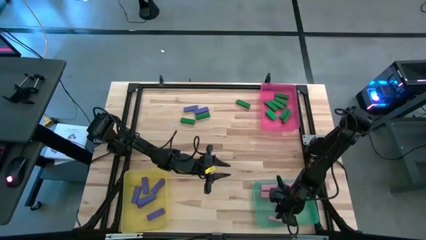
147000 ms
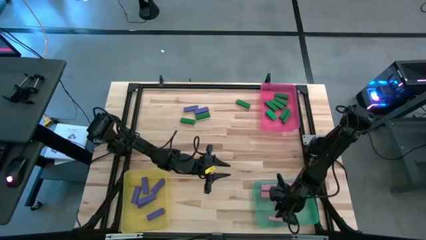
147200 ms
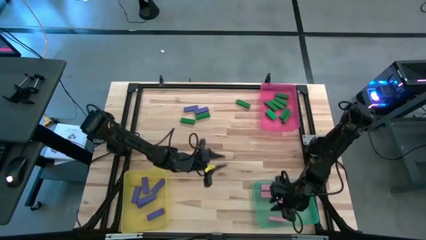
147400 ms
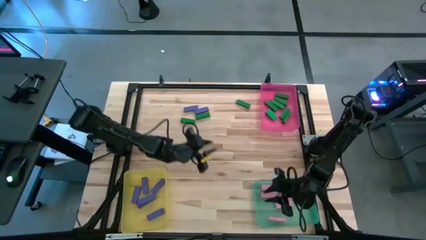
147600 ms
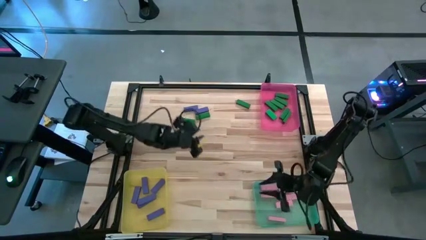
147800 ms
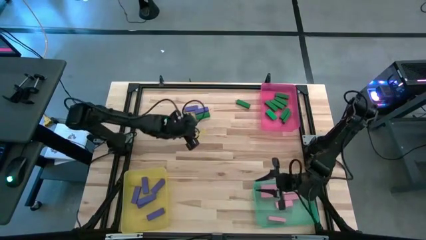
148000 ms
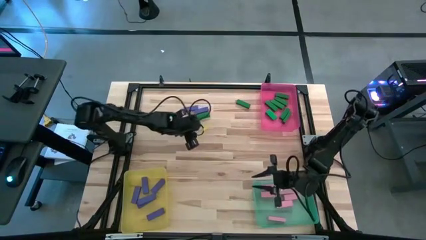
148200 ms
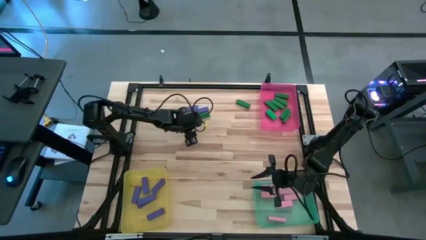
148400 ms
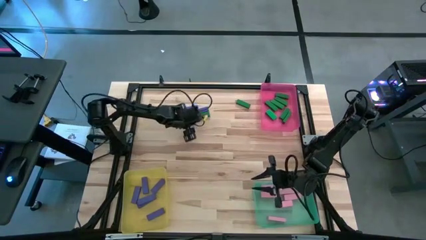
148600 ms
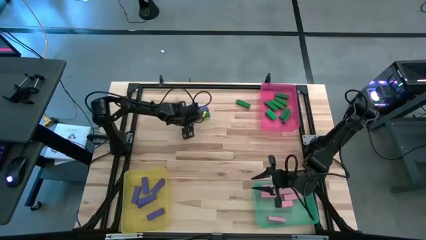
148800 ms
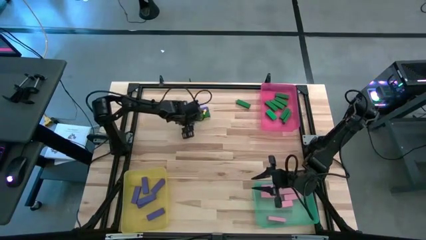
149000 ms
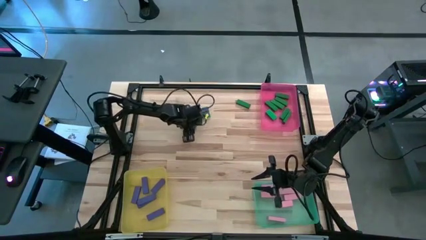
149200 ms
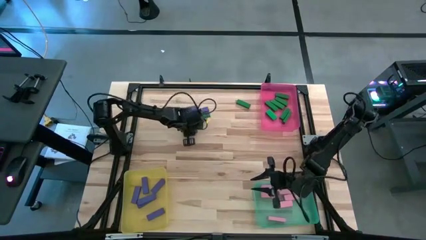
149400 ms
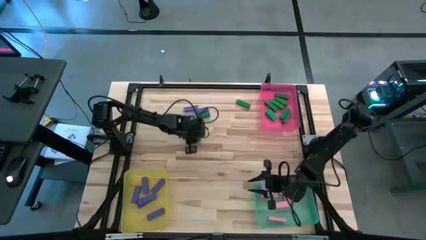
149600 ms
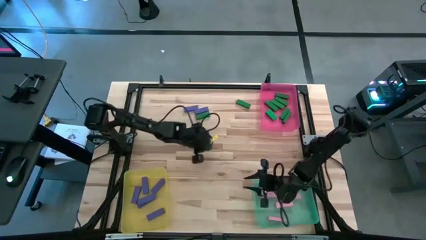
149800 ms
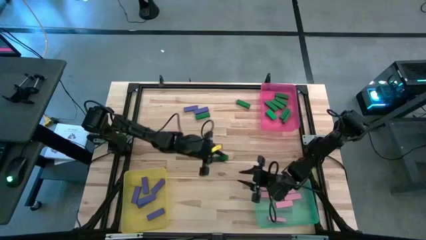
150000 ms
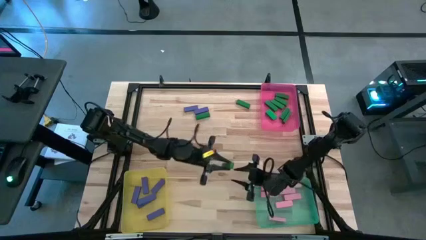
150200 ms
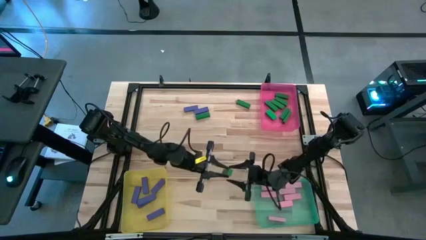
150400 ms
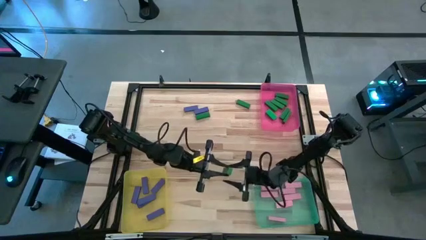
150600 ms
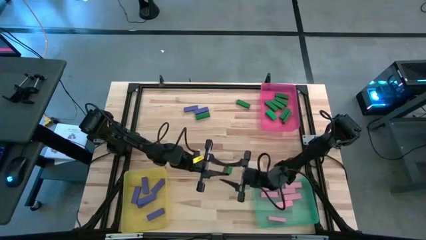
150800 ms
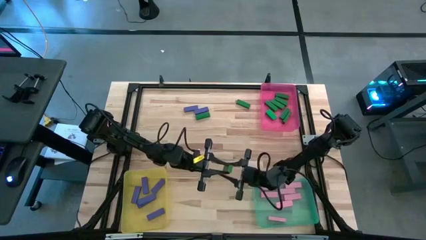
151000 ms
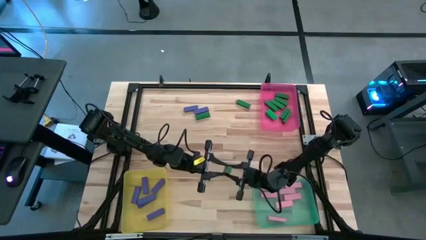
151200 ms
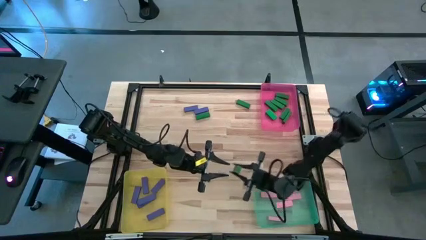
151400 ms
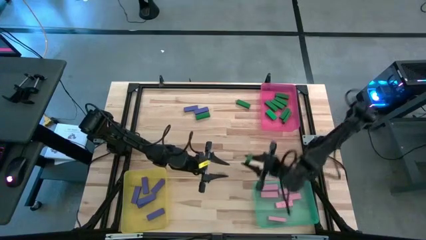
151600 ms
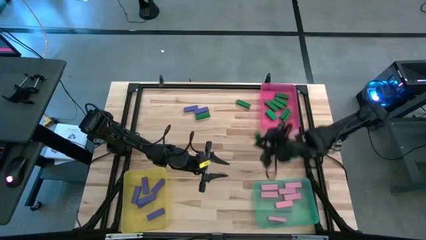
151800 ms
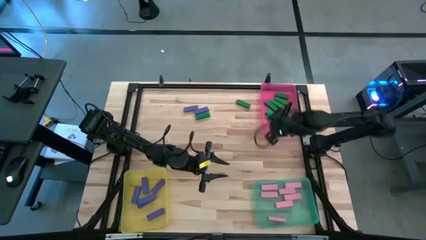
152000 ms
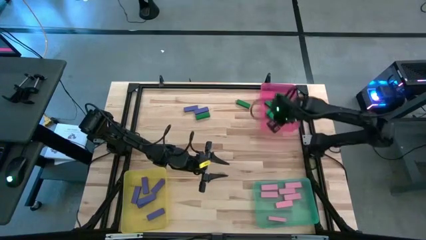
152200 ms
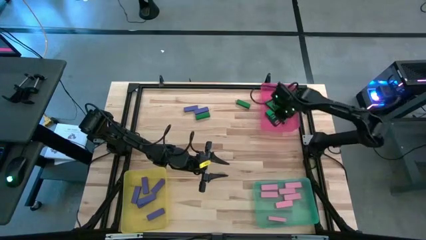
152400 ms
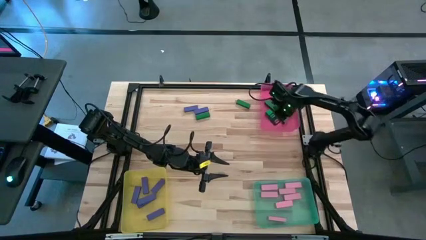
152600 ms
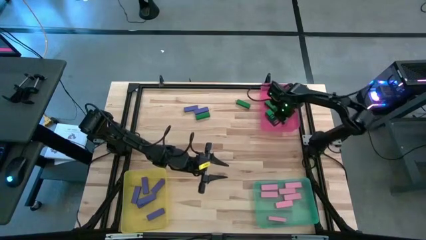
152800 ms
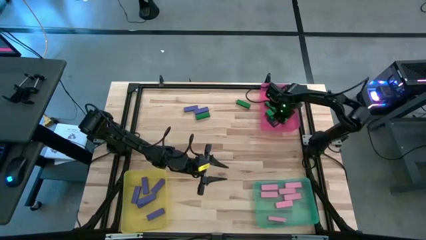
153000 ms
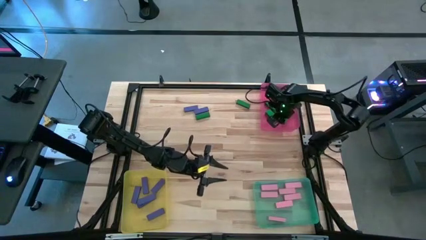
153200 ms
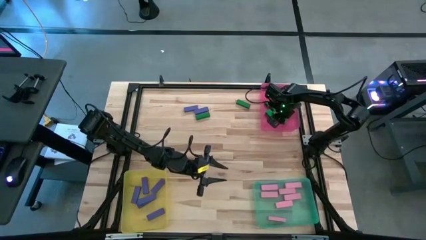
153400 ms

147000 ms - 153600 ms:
Task: Sort blocks
Put the green block into the pink bin

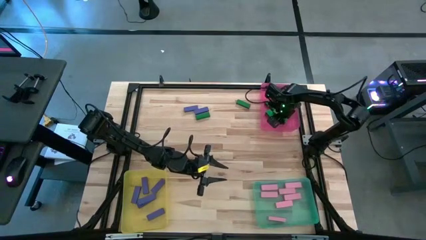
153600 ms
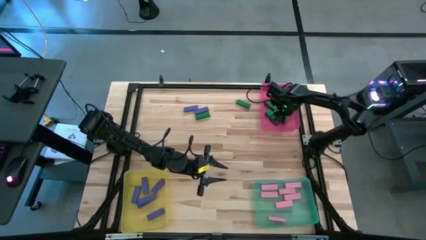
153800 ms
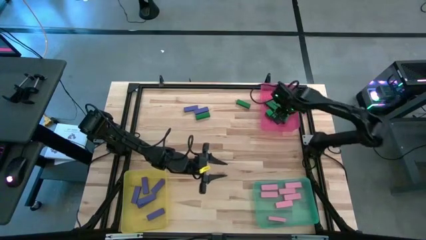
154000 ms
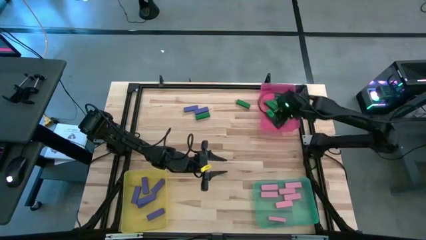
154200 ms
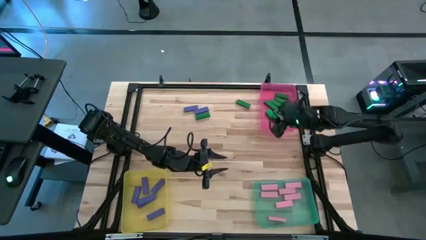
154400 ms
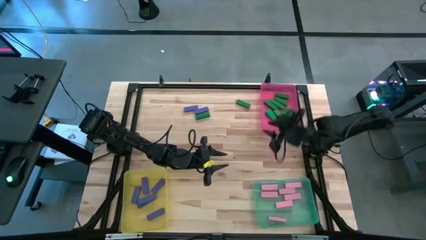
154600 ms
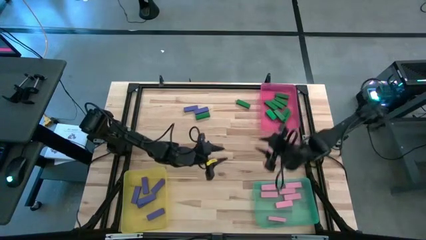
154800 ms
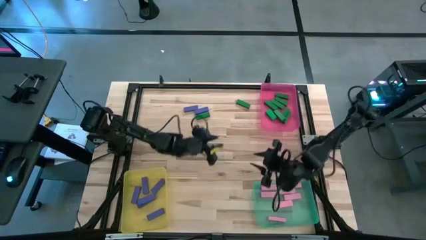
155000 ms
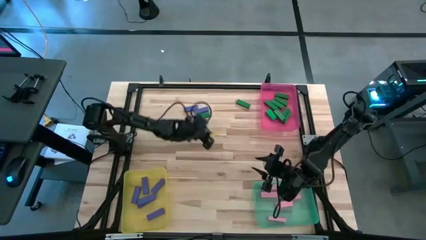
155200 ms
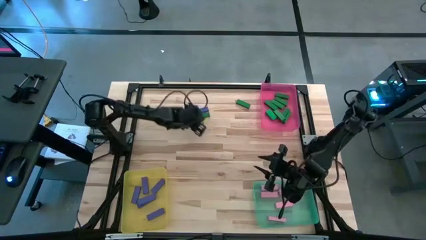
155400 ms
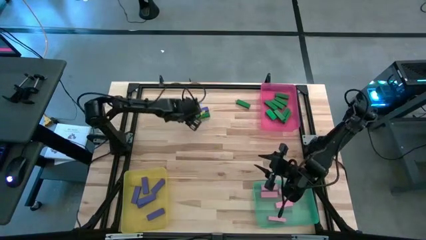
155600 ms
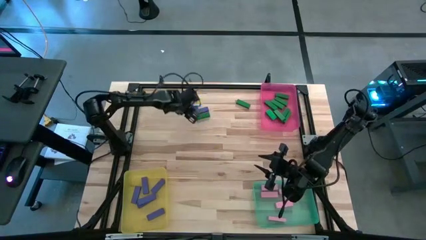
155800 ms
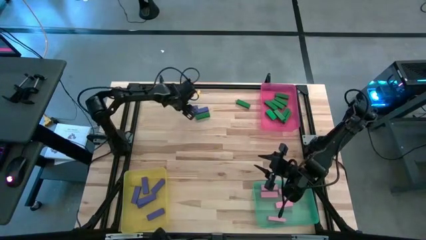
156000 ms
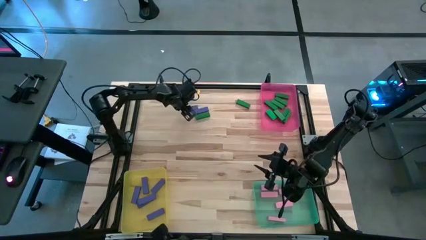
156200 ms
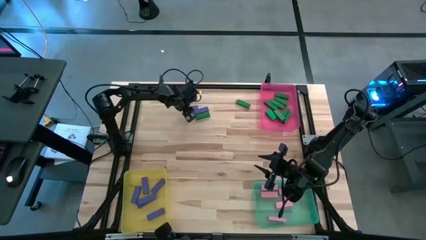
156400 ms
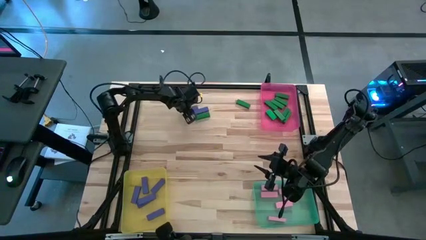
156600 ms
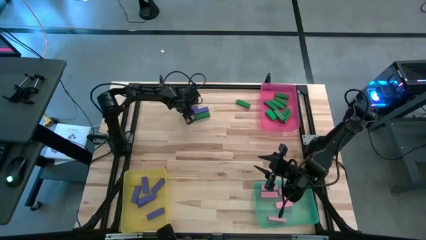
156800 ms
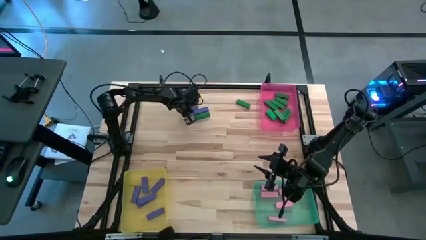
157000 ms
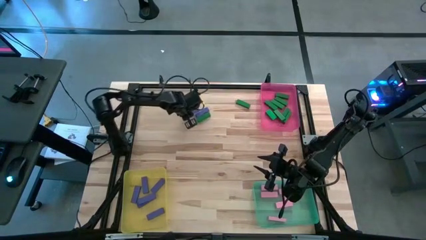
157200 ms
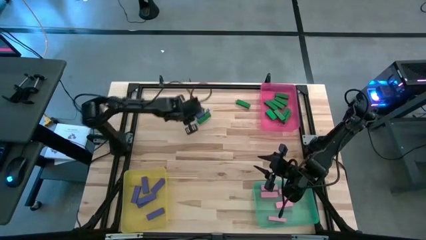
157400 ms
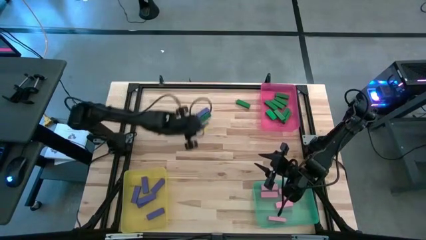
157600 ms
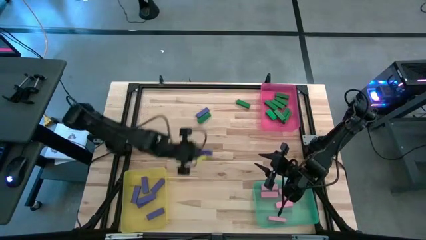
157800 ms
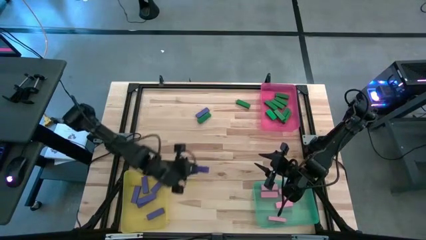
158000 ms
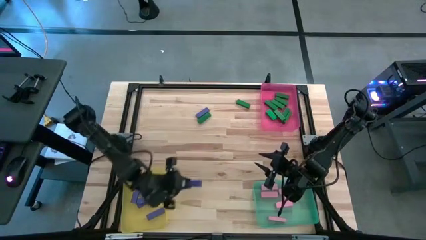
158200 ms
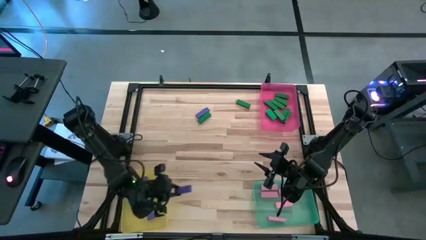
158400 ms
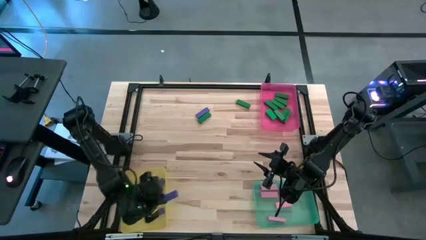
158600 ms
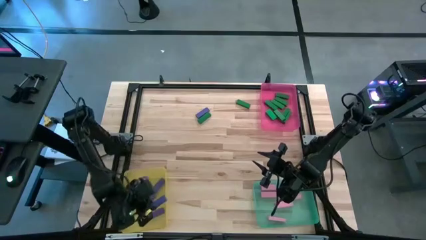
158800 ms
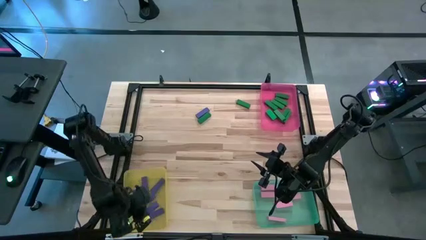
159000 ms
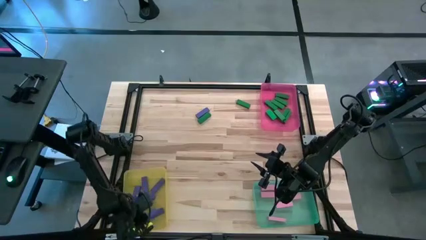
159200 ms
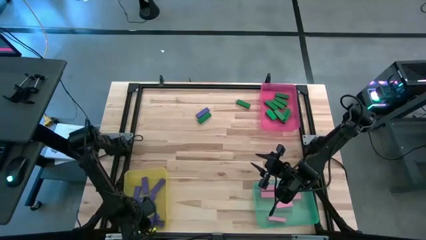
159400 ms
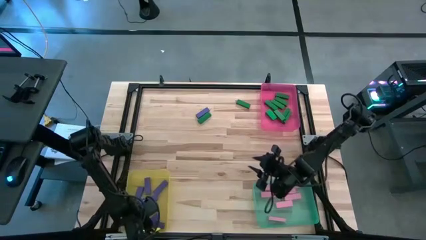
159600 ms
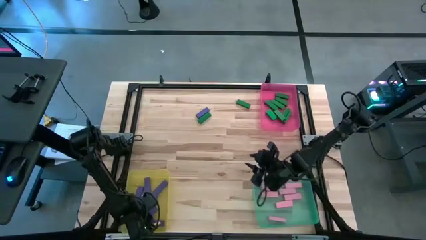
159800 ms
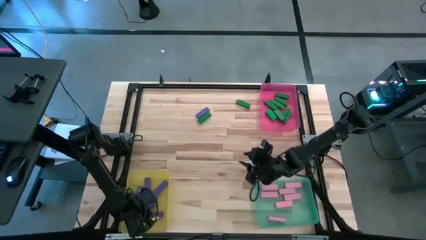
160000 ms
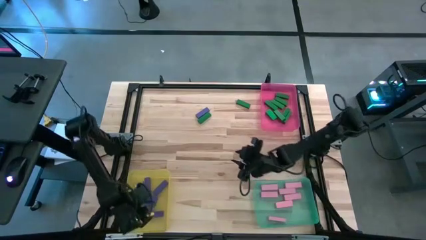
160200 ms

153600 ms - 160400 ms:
Put the blue block into the yellow bin

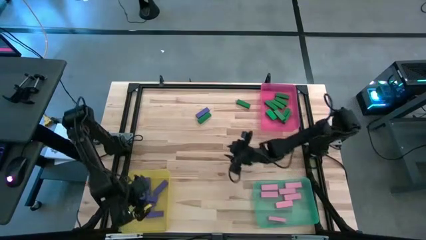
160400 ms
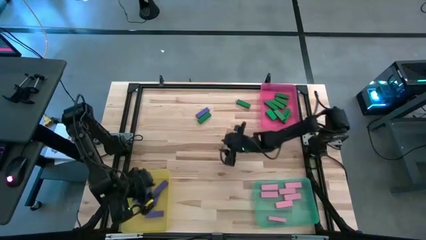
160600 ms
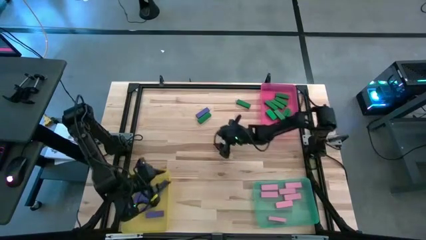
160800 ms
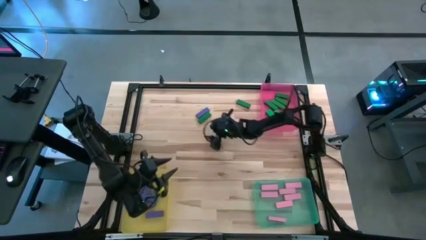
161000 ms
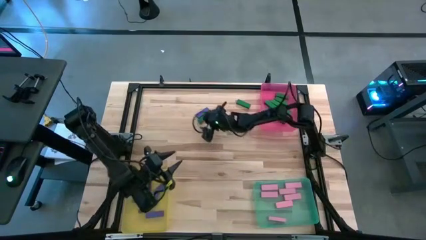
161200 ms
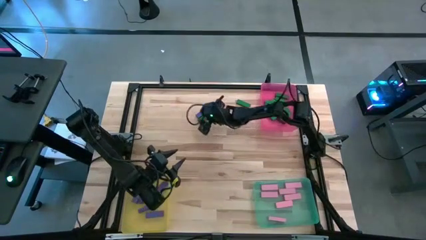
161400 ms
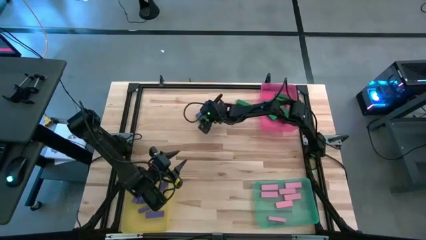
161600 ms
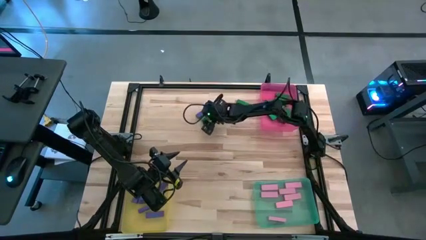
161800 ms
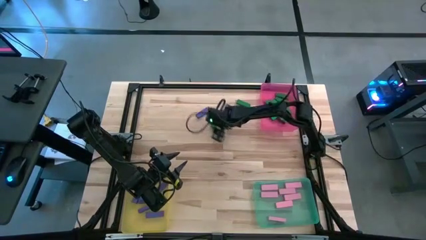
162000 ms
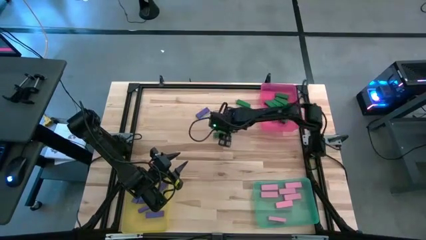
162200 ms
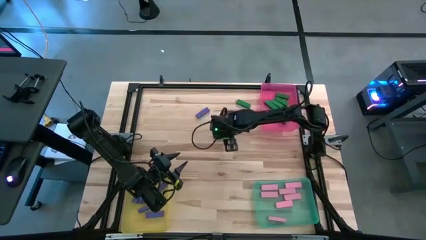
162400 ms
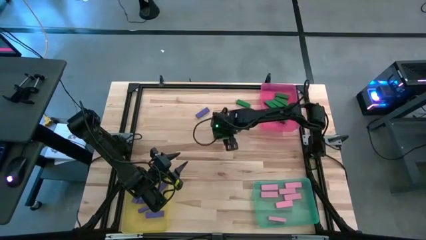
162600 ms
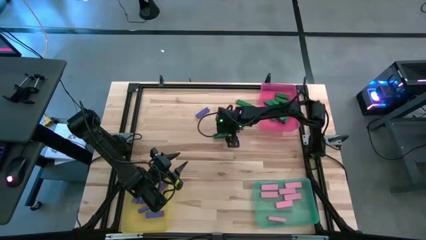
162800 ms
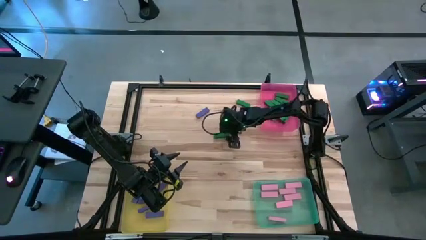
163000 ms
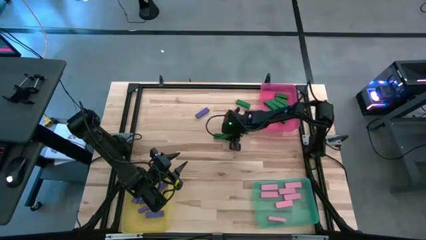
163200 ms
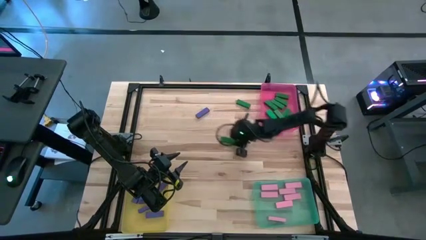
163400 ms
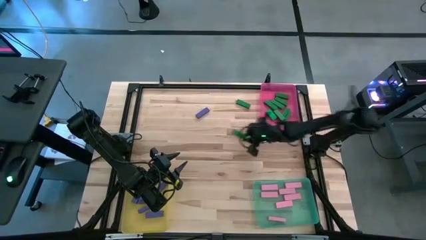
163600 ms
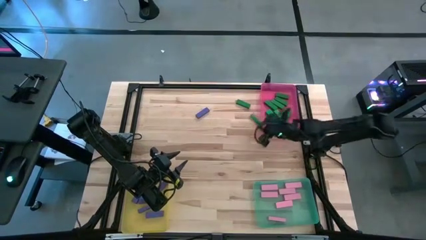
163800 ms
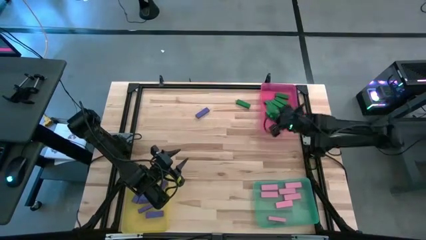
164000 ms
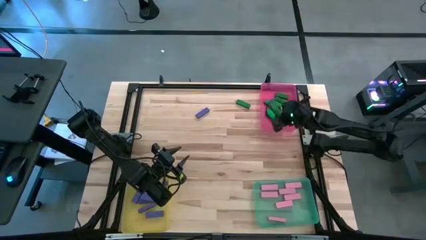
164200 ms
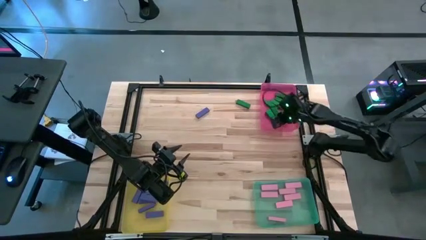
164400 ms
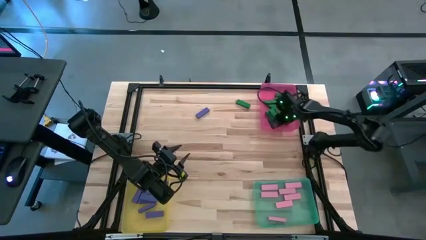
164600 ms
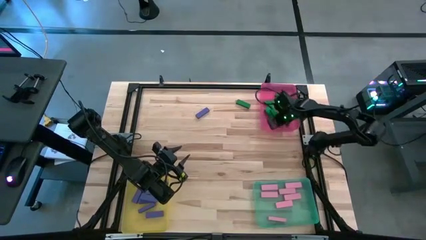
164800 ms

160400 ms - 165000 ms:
Put the green block into the pink bin
